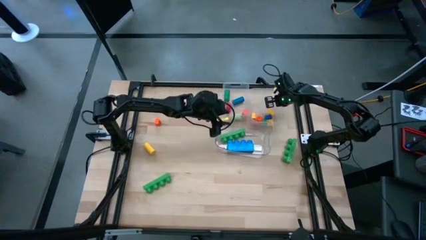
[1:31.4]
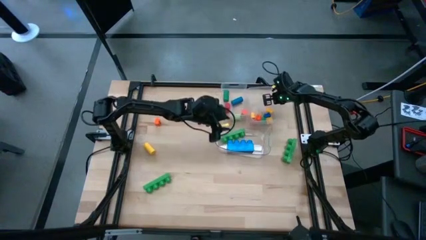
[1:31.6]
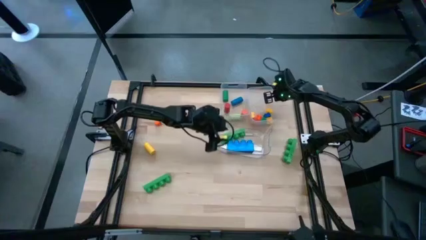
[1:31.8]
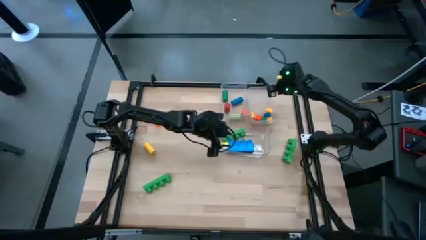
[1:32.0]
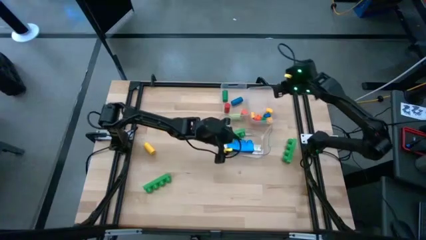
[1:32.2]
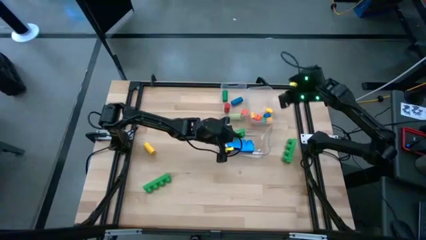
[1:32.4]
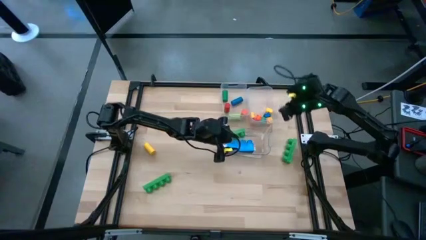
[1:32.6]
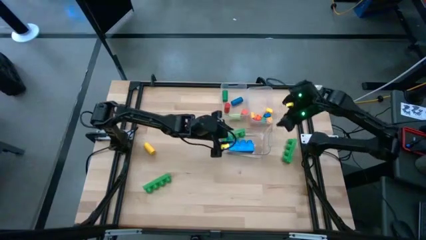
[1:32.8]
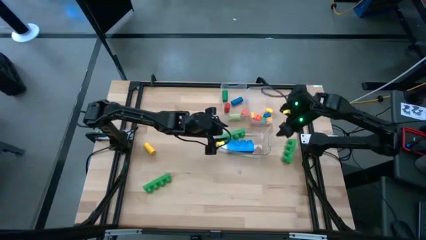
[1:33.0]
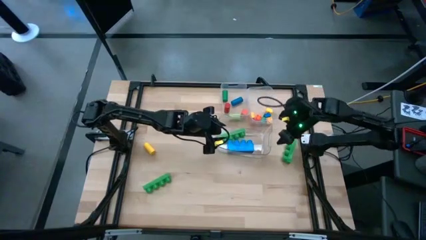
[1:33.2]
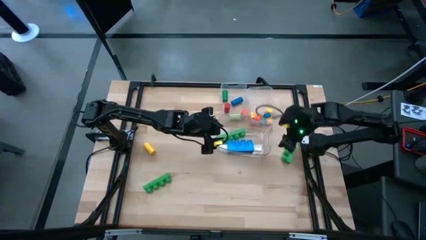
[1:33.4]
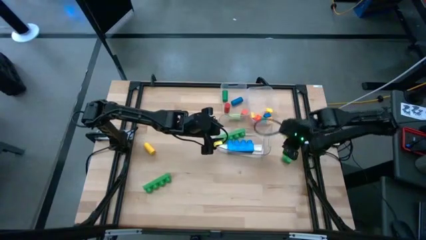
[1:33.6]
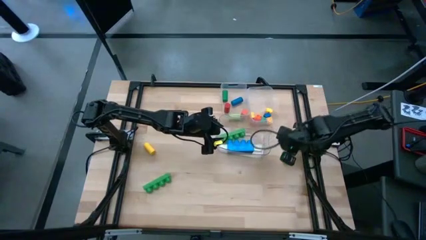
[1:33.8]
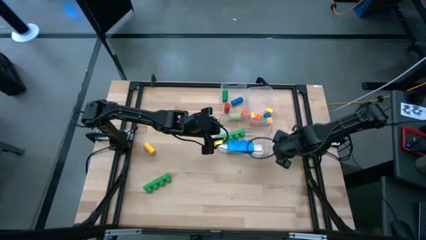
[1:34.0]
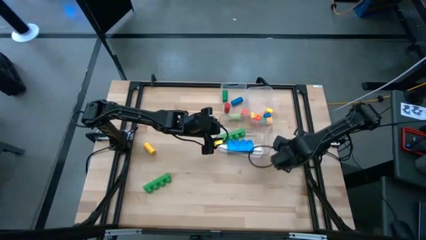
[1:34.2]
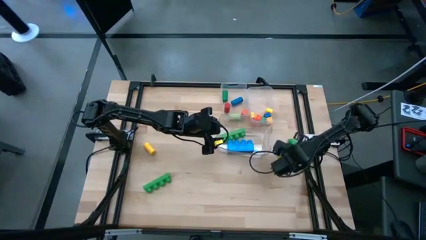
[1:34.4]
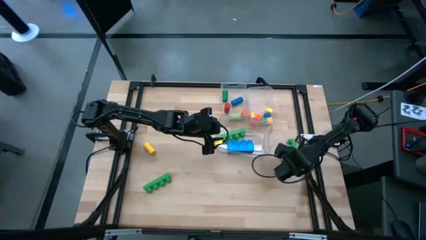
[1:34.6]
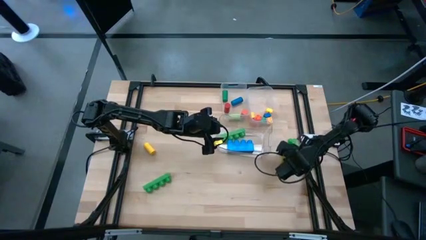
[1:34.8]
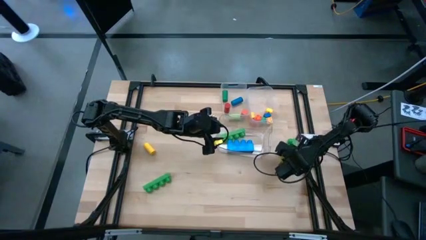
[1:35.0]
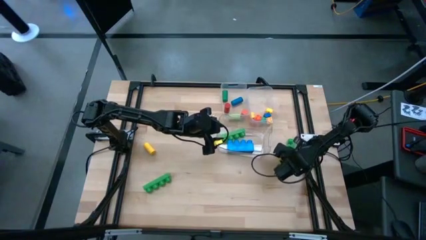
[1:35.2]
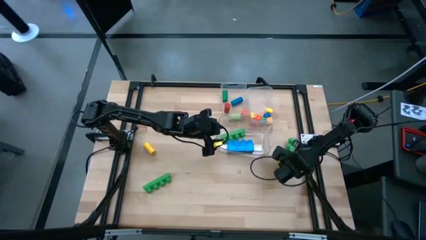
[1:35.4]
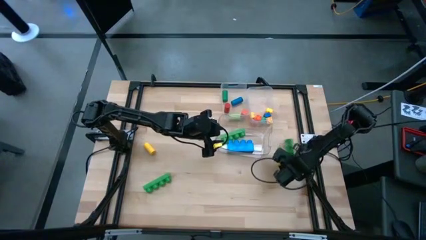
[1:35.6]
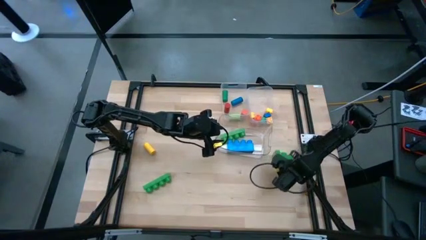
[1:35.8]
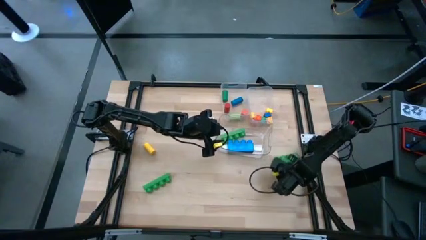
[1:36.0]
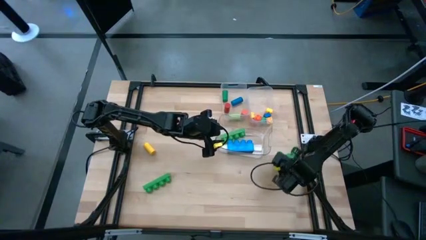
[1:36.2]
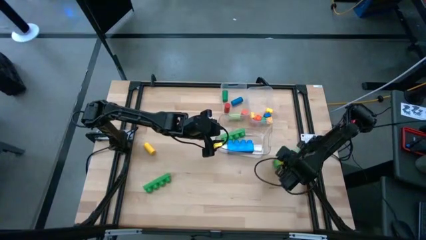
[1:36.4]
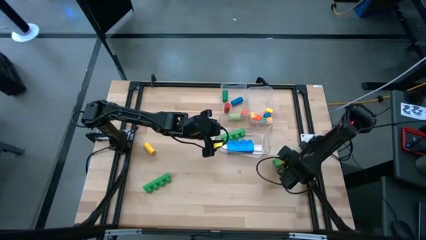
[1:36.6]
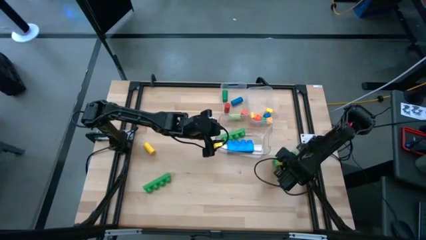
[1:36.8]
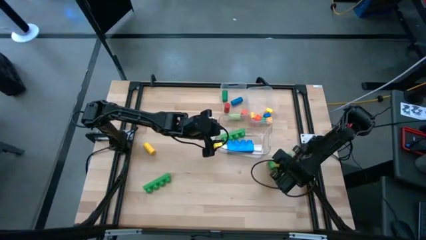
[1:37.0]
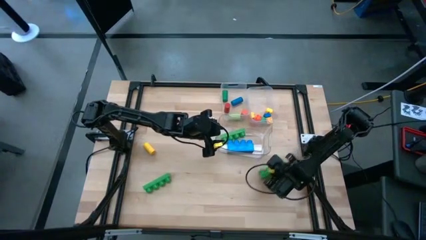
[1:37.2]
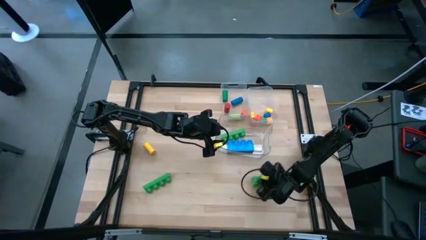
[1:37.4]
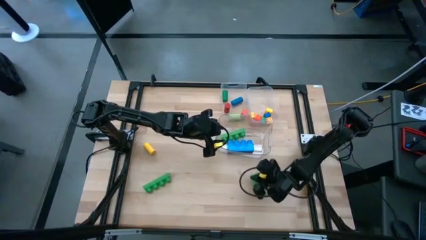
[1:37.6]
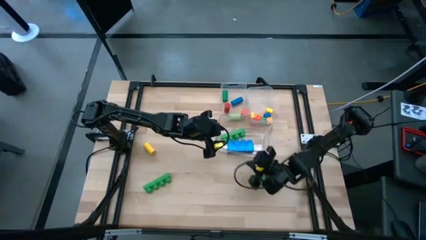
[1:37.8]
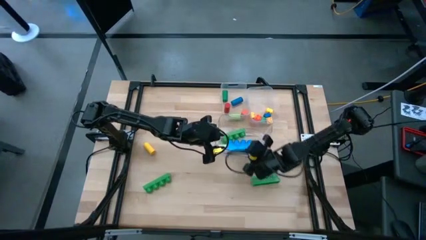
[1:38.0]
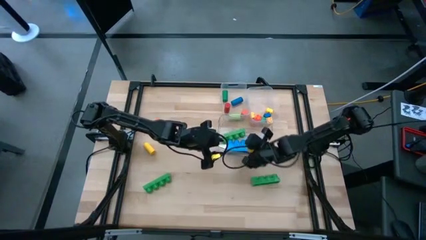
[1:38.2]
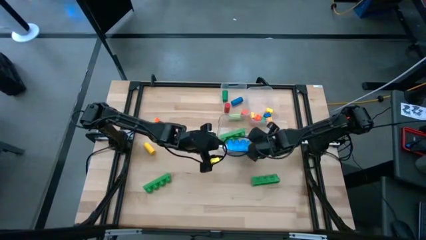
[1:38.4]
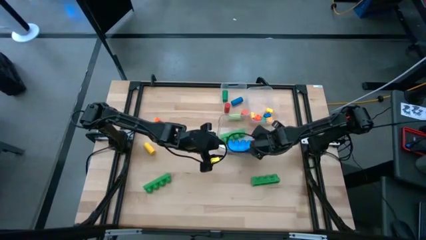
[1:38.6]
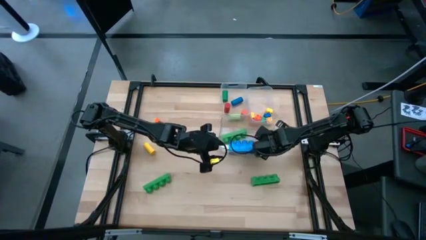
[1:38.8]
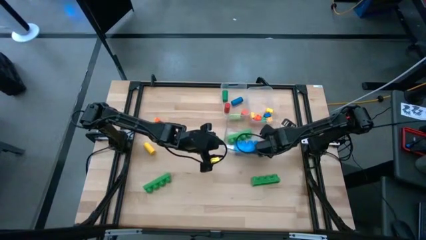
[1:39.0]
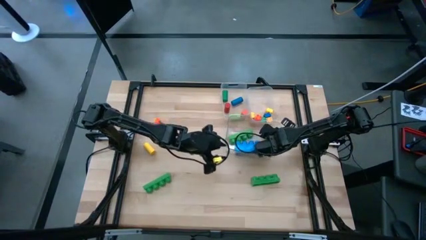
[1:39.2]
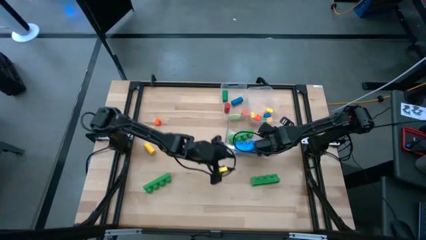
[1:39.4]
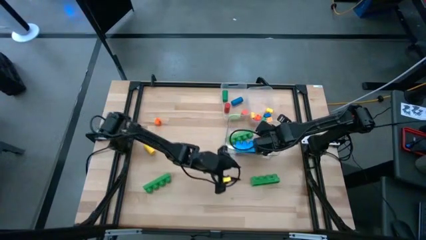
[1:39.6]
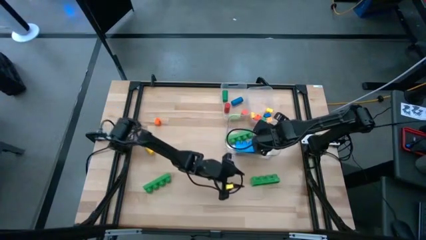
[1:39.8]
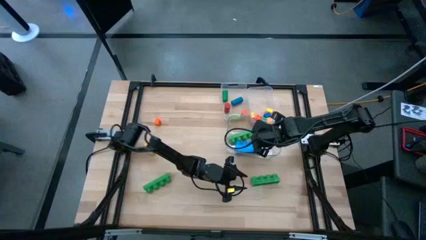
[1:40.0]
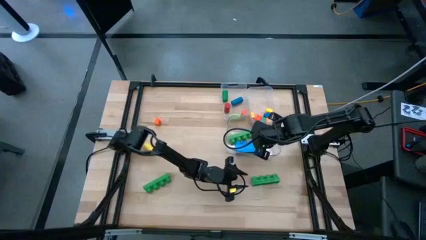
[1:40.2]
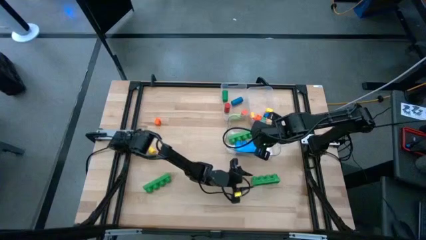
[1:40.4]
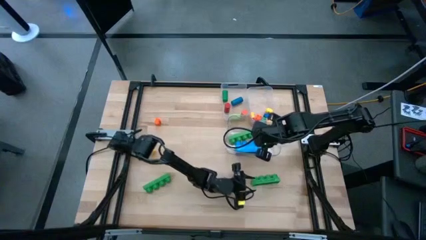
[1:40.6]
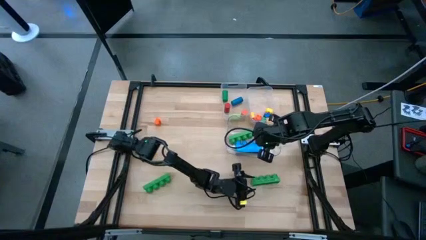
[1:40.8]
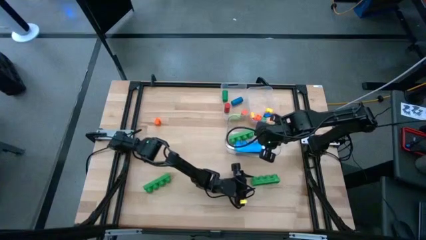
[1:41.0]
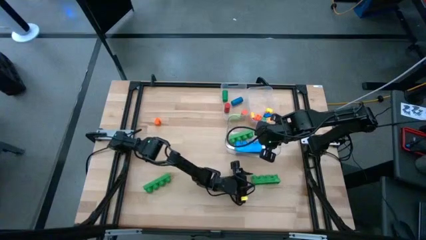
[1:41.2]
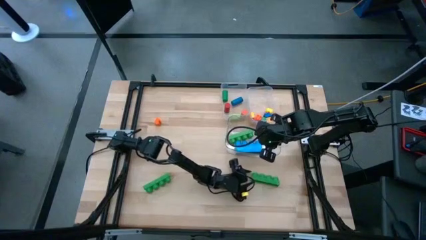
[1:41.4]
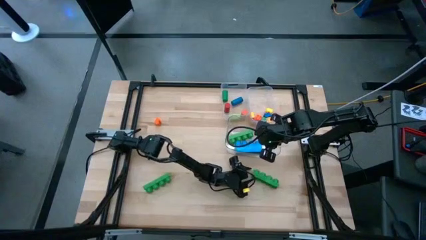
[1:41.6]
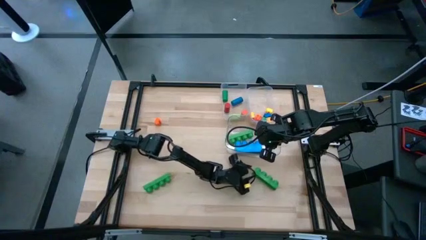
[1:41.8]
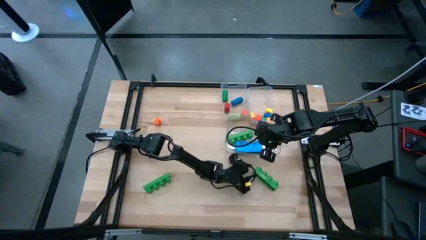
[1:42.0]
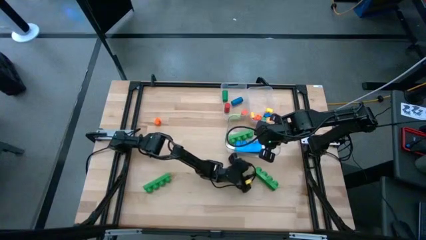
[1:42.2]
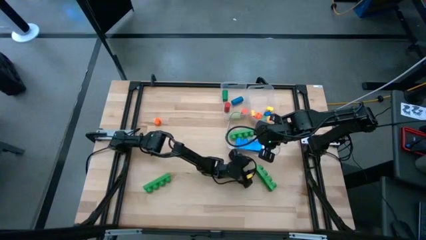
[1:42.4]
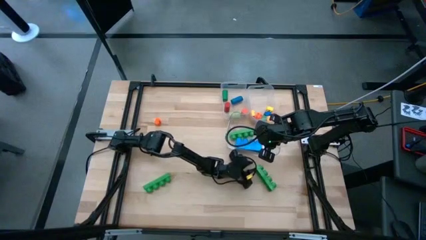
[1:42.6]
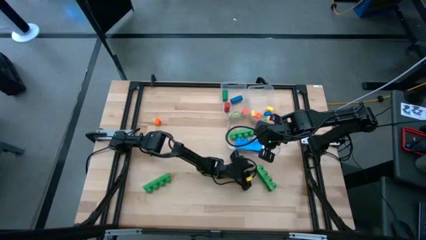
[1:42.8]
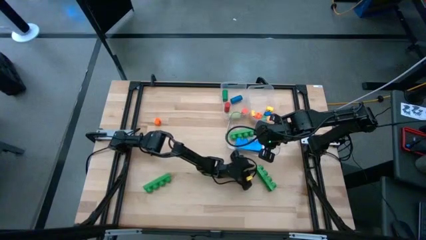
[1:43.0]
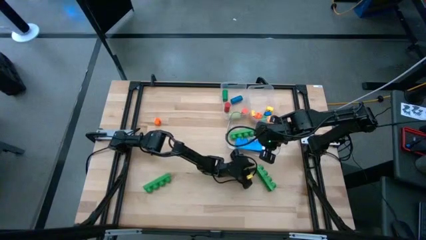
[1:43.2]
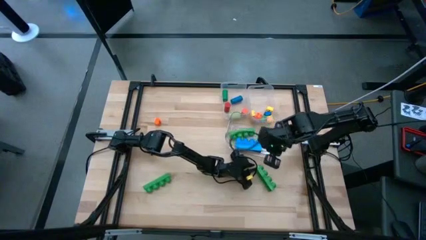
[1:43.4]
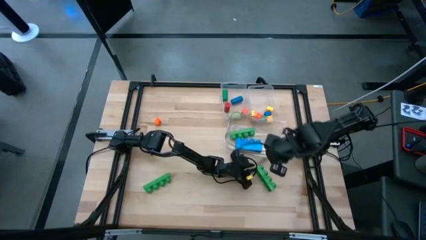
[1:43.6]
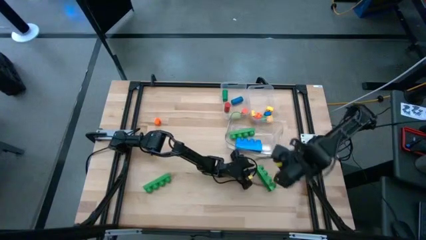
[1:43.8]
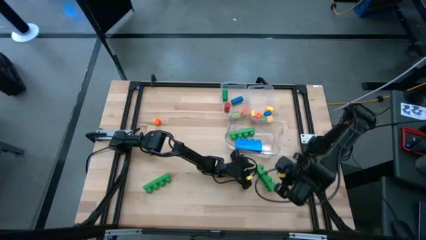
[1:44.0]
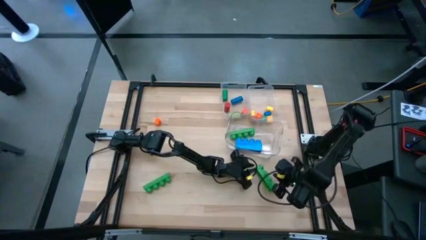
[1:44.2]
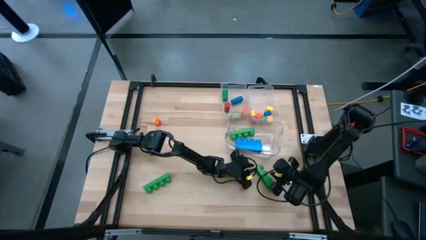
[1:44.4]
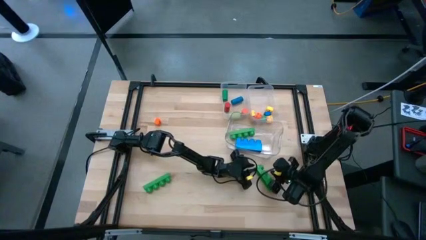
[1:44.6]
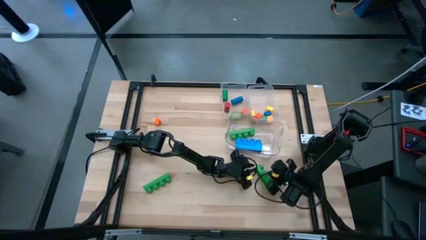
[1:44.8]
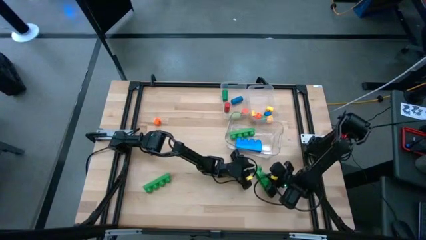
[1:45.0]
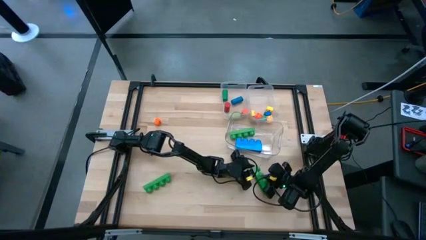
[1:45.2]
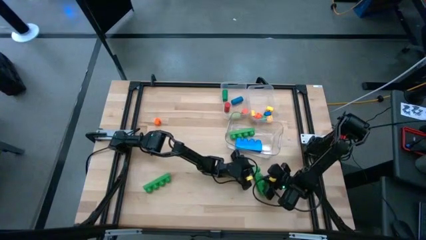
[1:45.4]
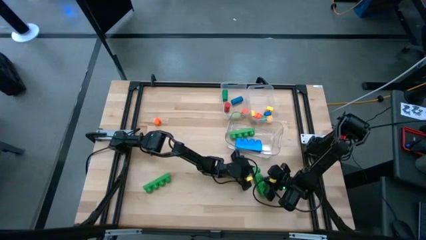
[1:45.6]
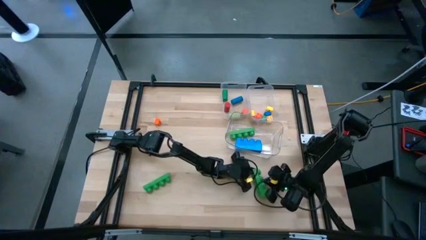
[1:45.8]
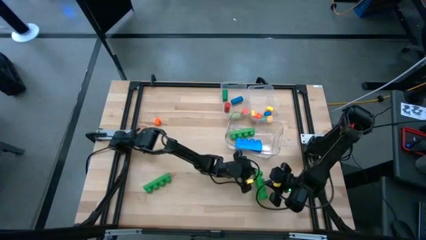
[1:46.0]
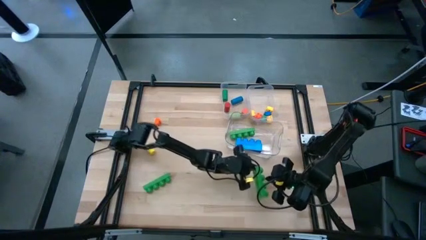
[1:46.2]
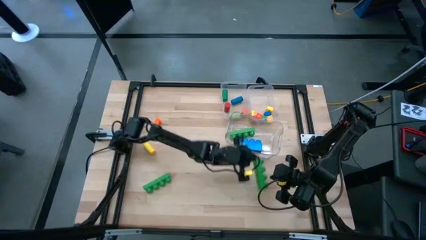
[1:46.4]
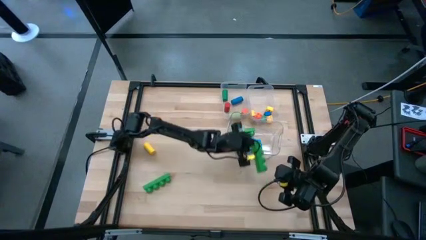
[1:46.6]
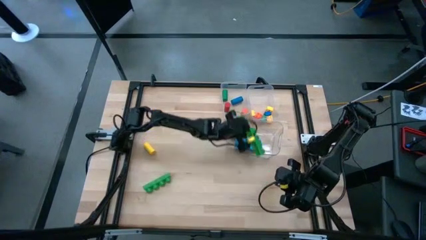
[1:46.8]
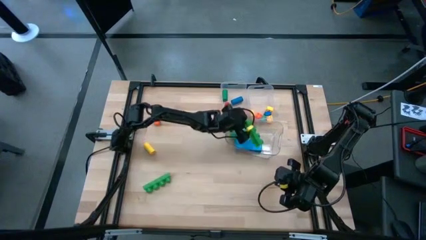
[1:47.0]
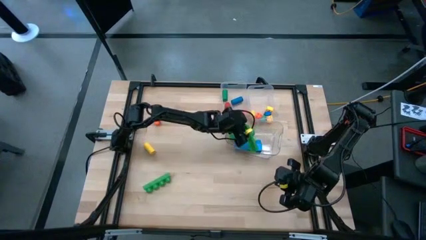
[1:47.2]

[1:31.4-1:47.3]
Task: Sort blocks by size
Put the top large green 4 stud game piece into the bottom transparent bin
